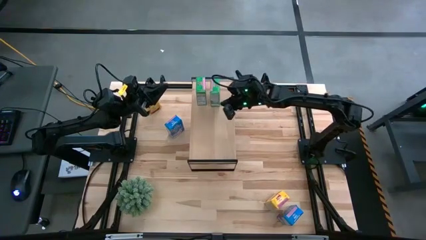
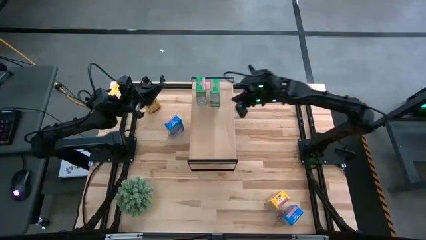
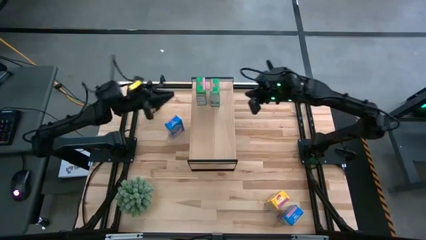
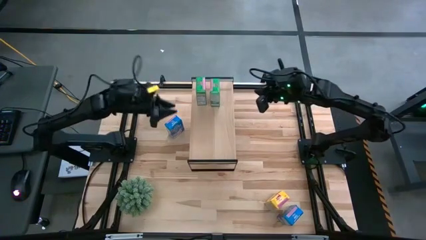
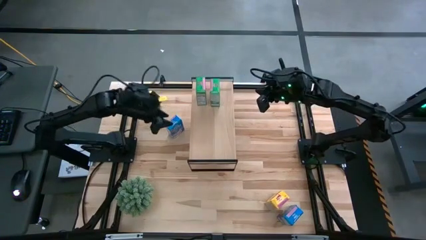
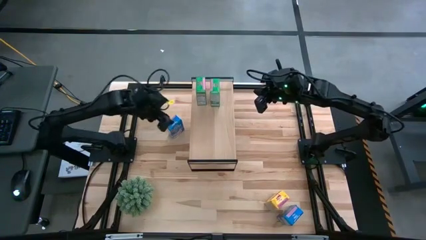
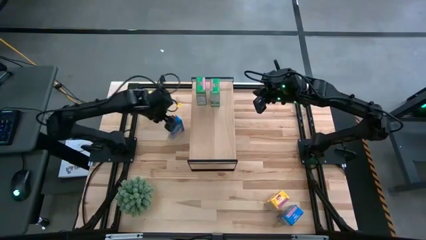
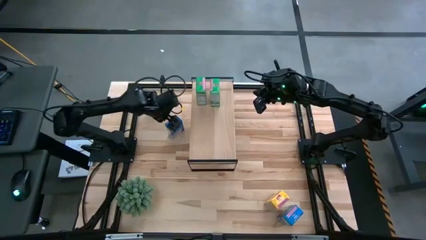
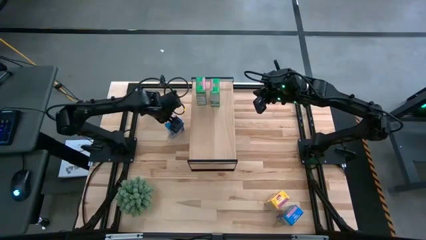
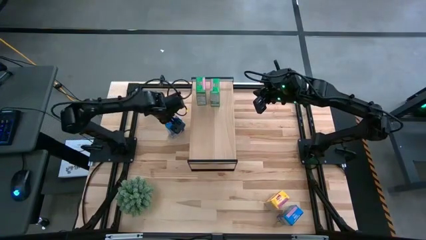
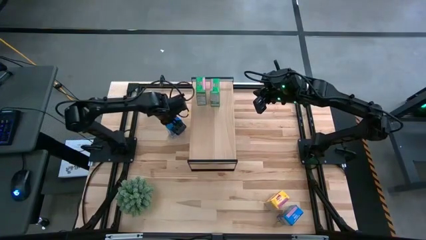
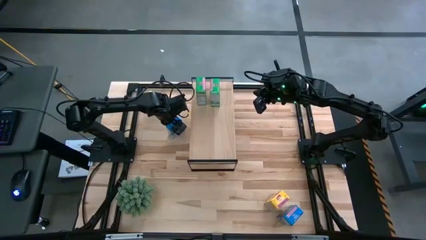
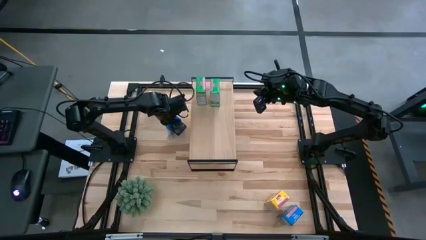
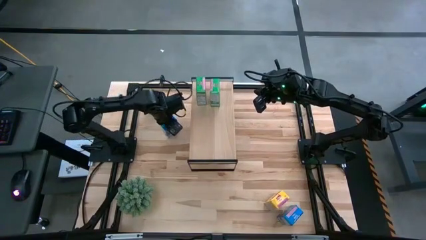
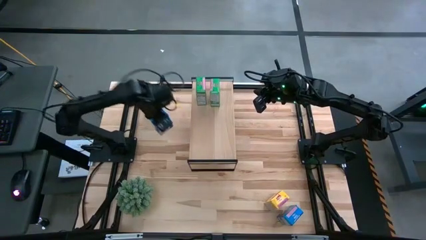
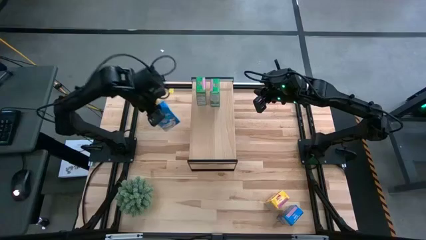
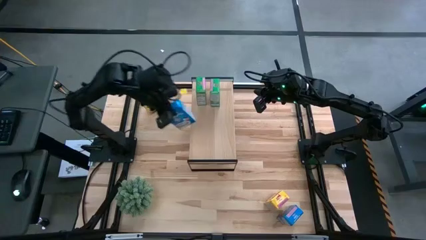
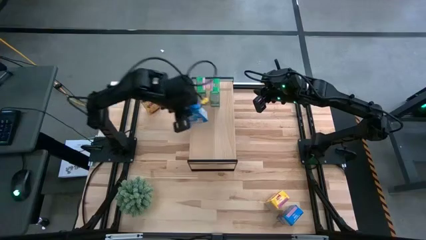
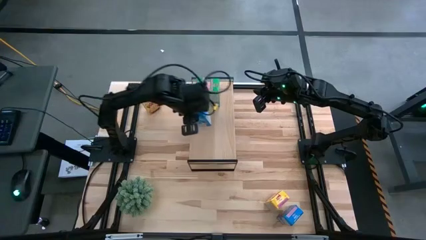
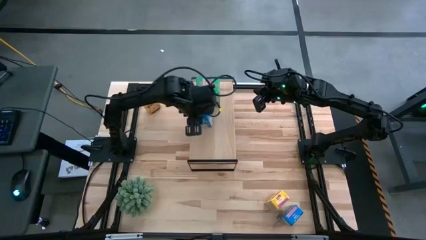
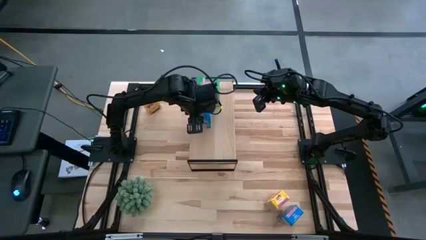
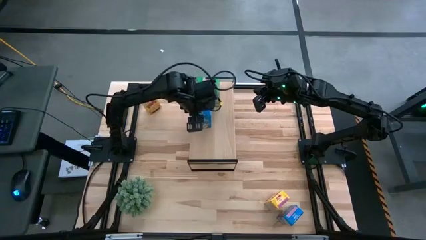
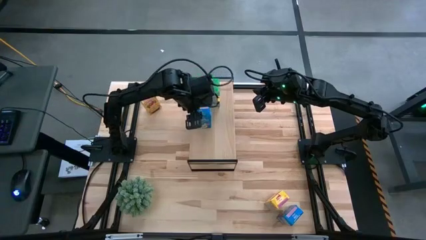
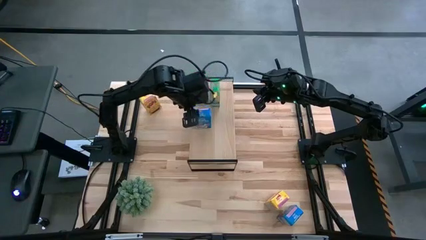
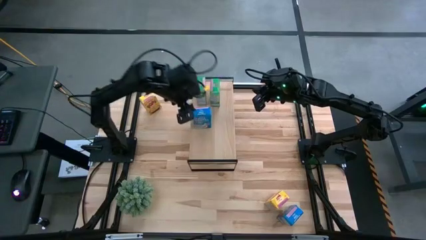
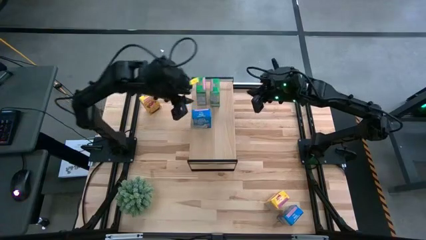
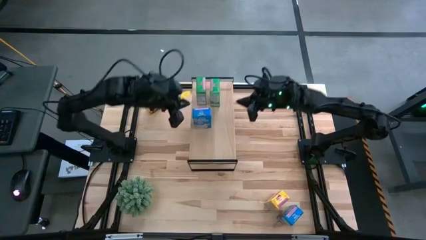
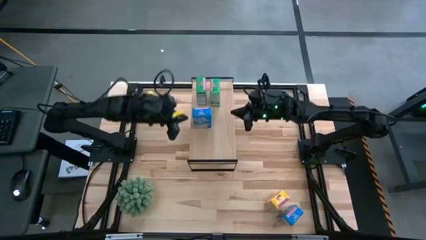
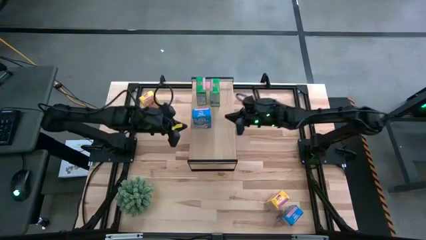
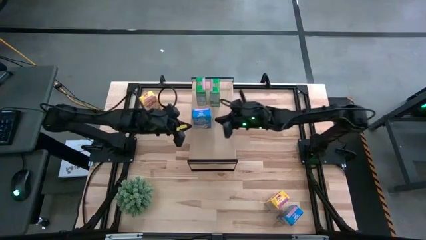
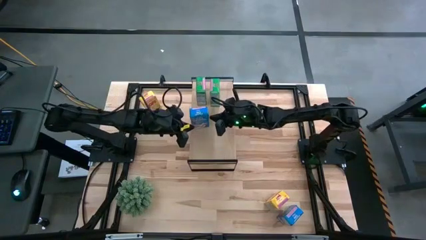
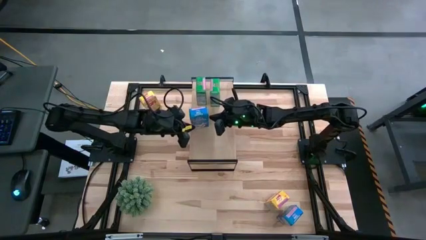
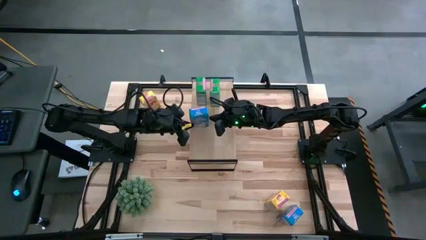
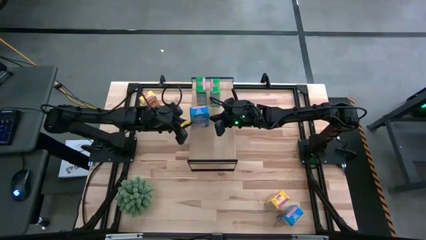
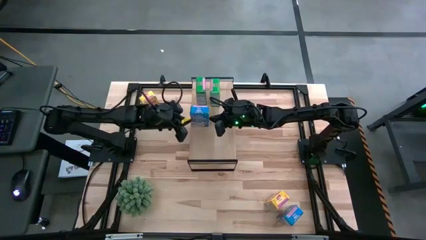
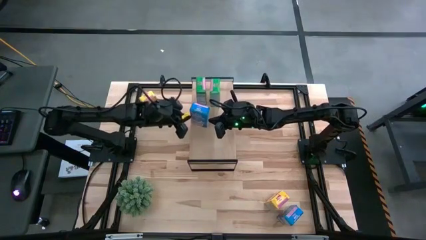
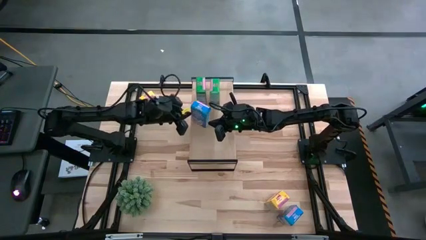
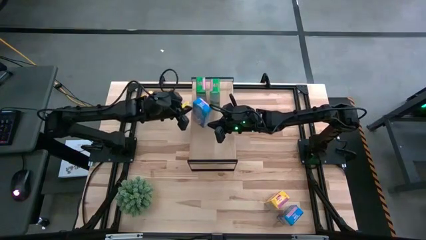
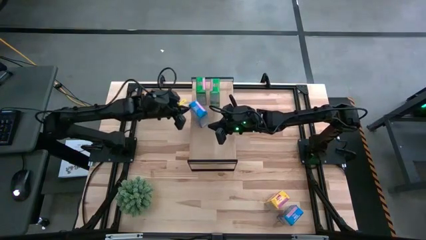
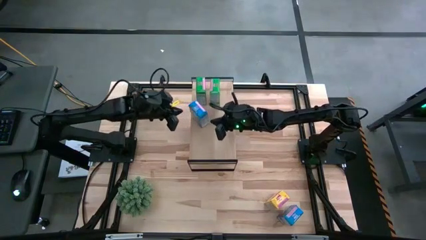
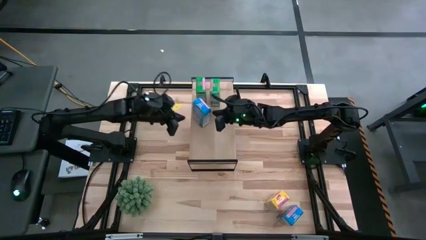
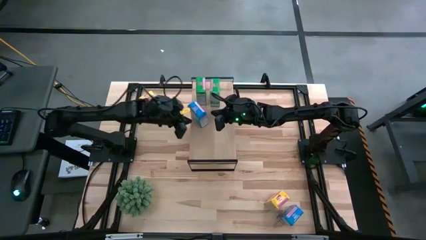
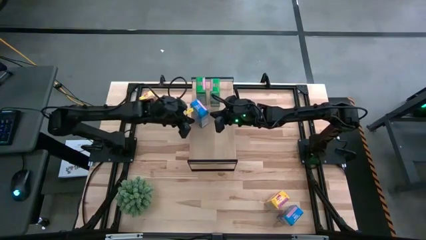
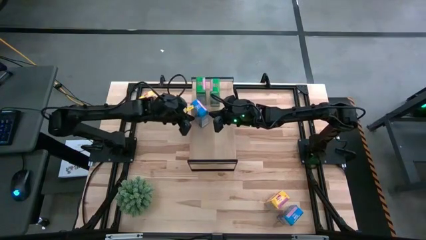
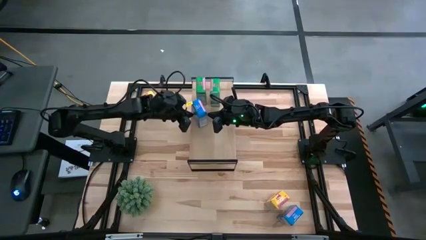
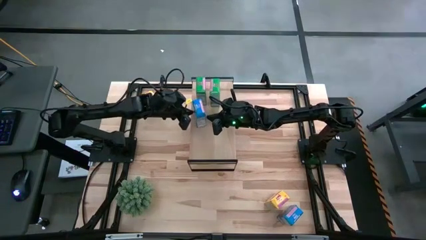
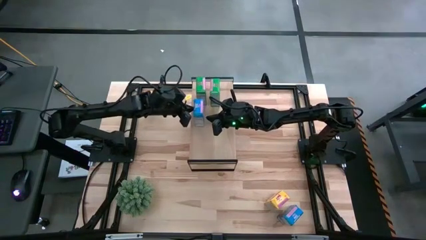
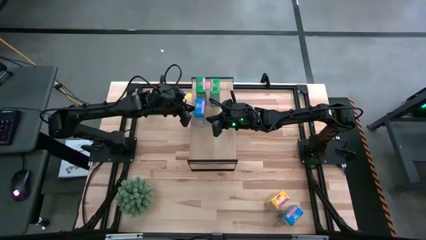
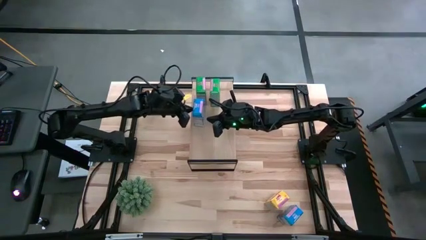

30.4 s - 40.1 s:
Task: Stack cereal on shelf
Put the left blue cereal on the shelf

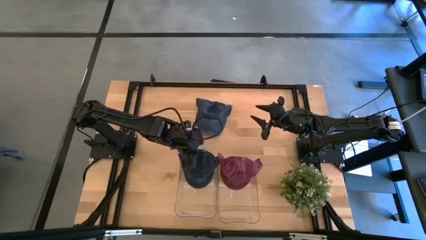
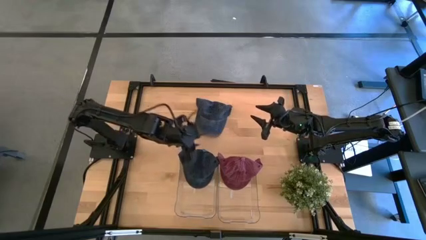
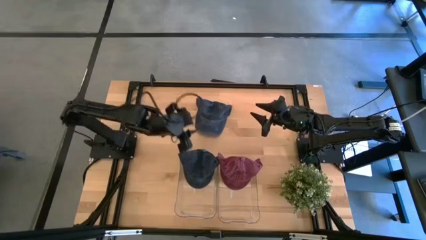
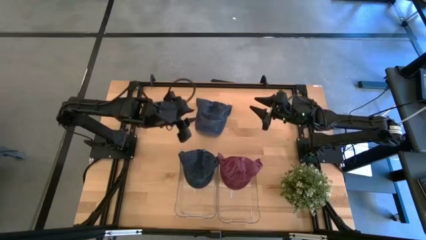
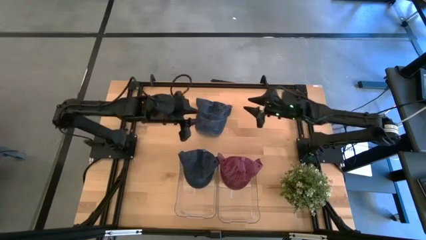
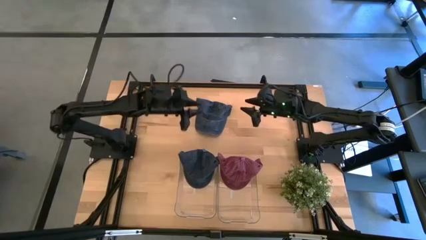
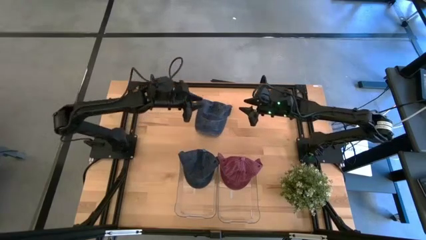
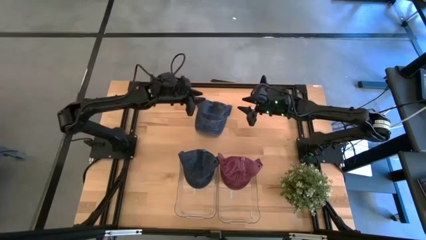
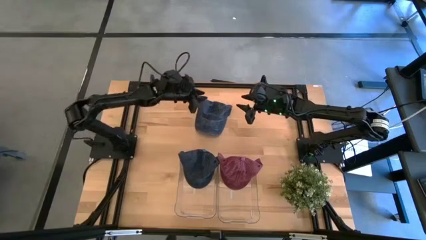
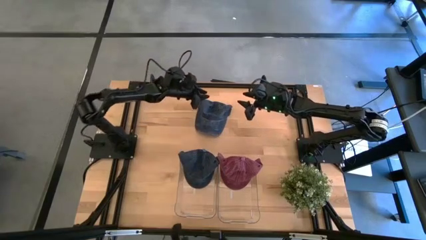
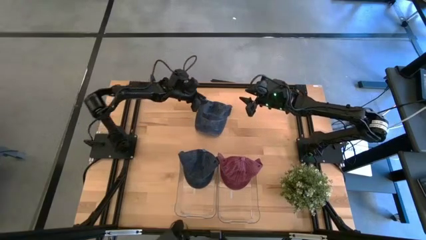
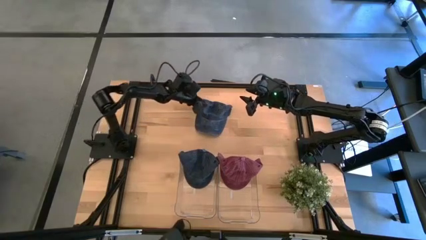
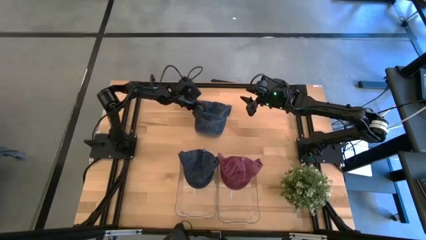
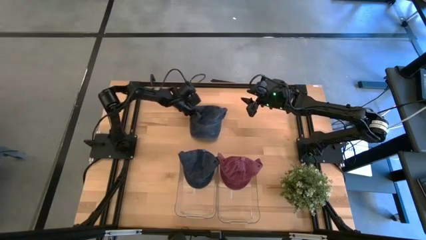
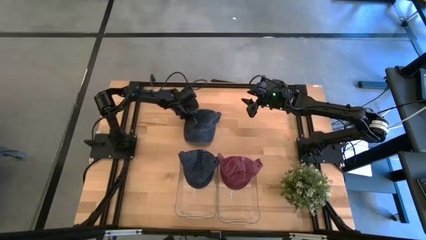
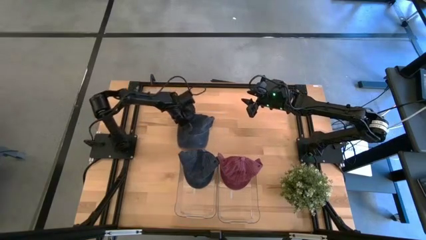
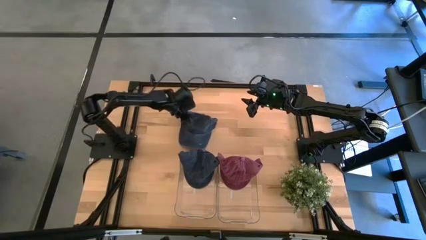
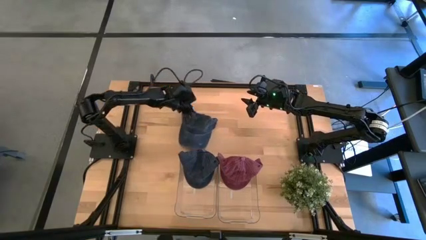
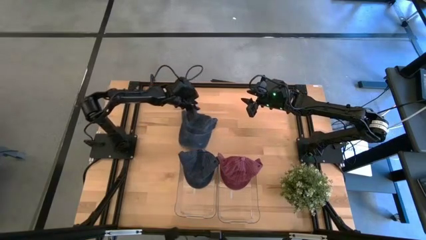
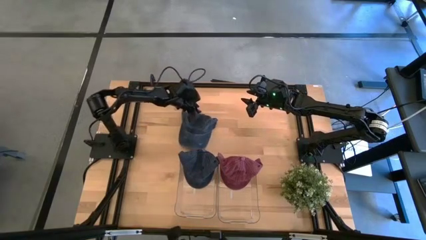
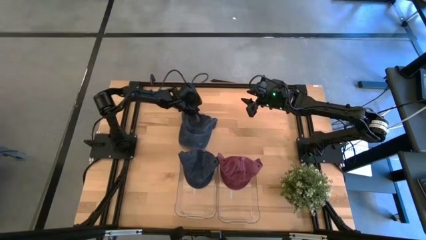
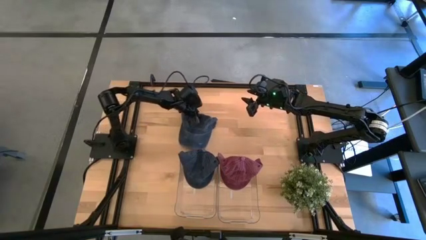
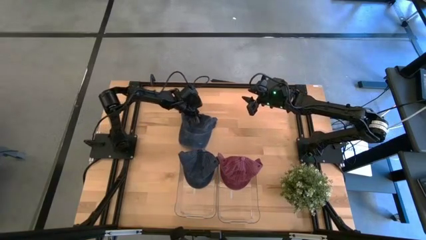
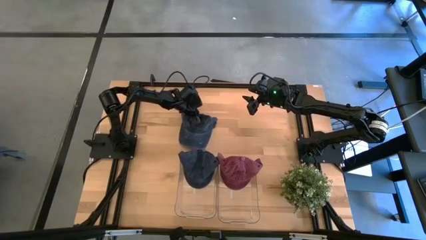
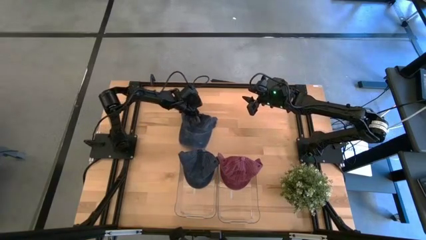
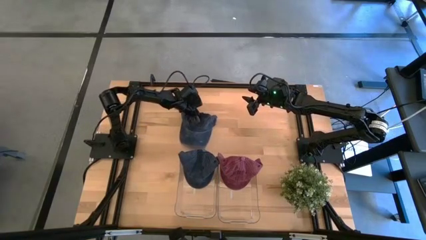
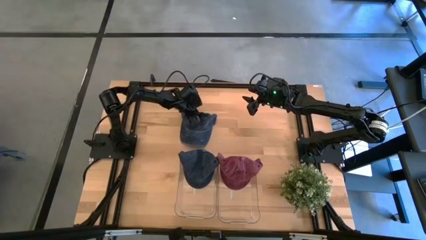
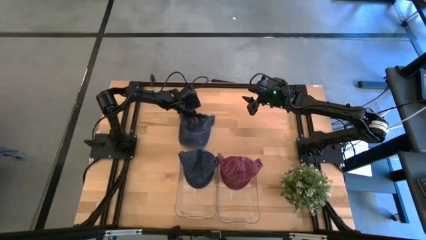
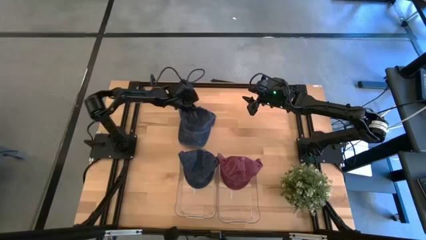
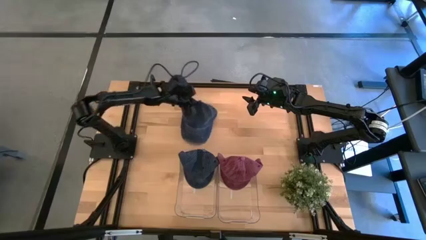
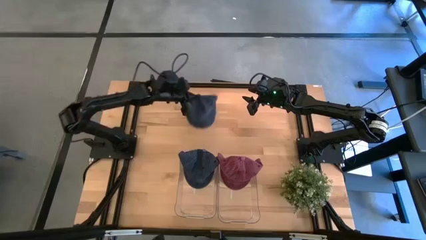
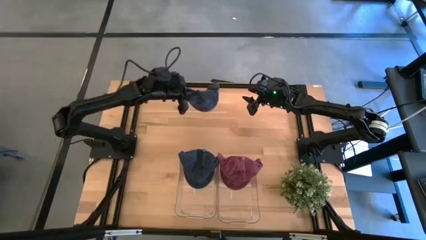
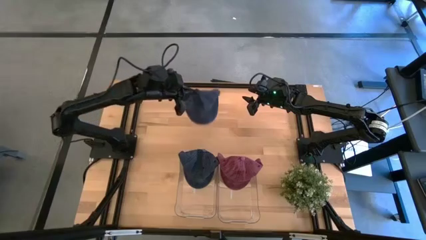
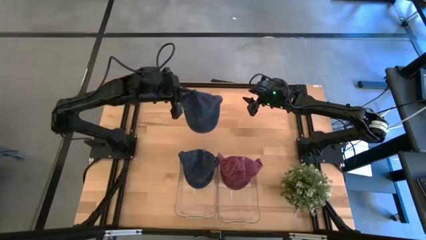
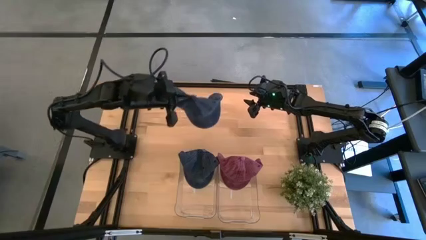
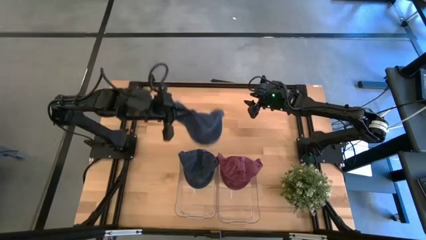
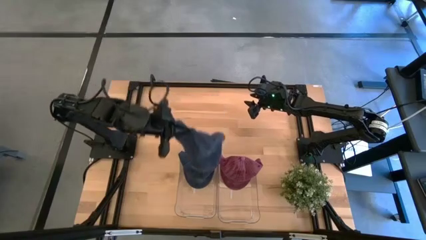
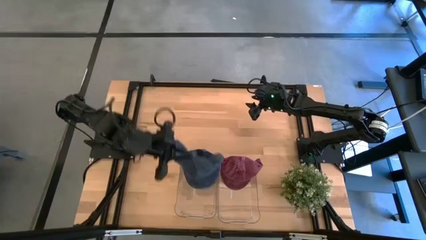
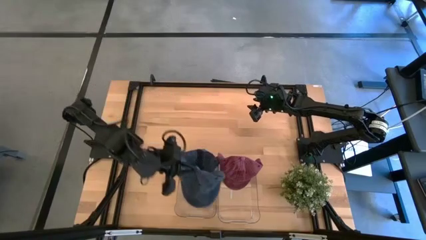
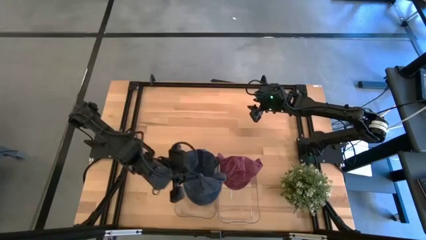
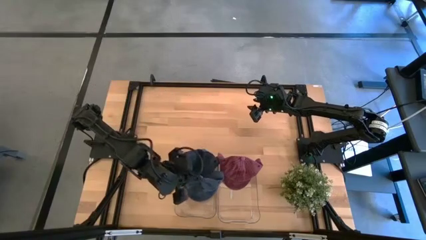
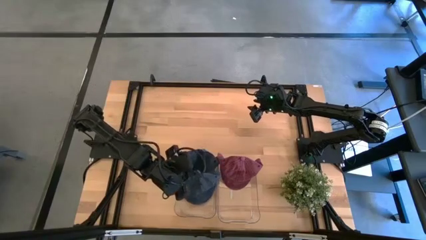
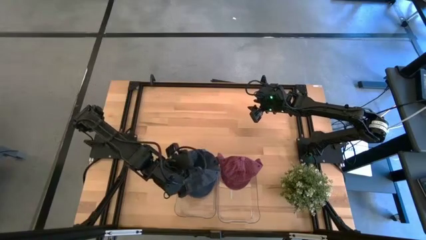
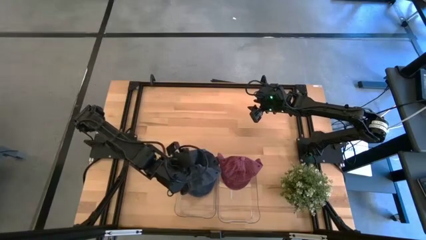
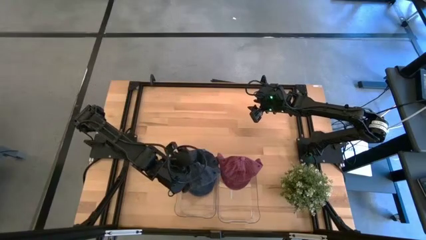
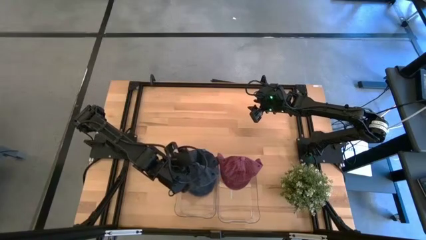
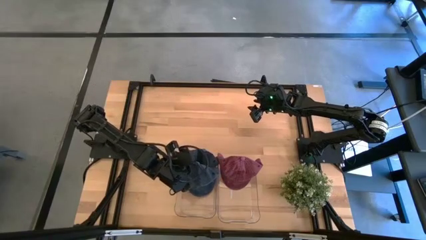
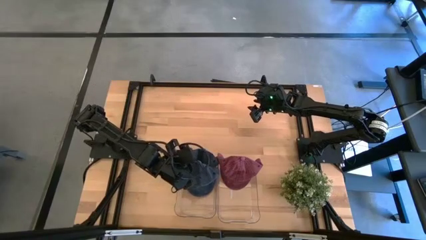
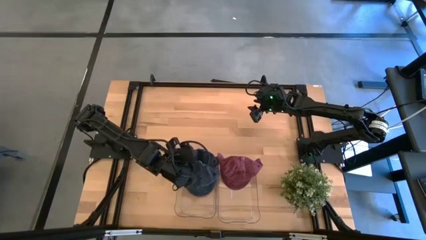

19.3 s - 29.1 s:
Task: Pick & Place hat
Put the black cap into the left transparent bin
